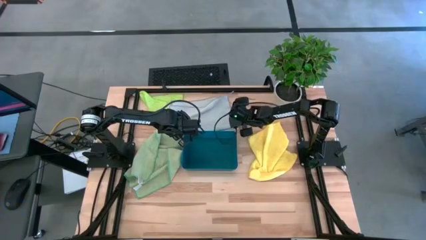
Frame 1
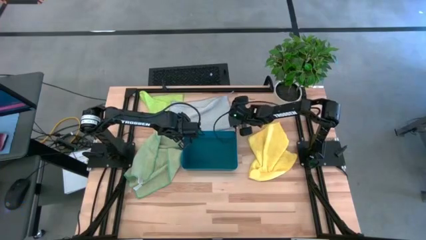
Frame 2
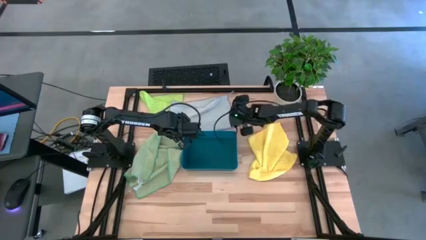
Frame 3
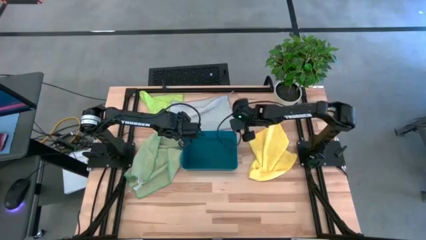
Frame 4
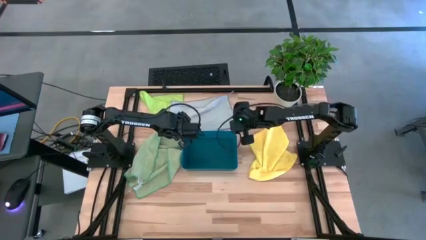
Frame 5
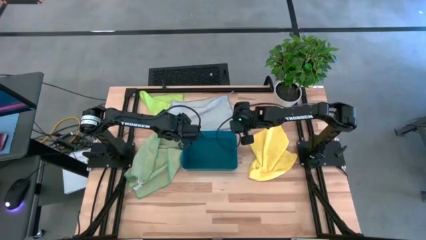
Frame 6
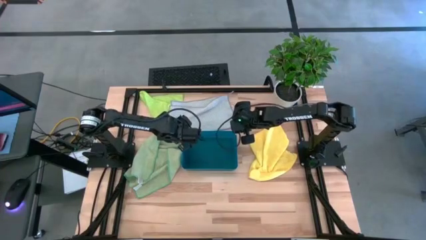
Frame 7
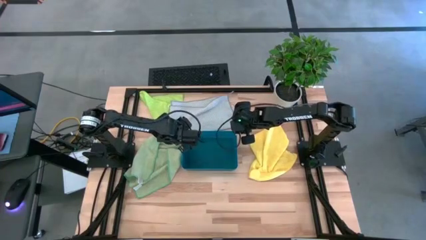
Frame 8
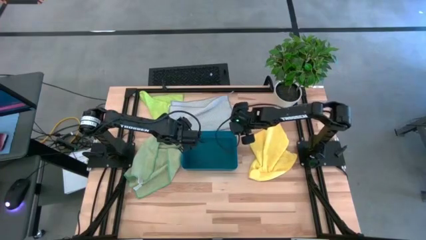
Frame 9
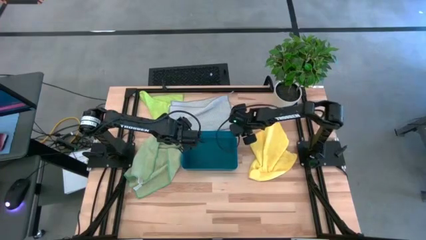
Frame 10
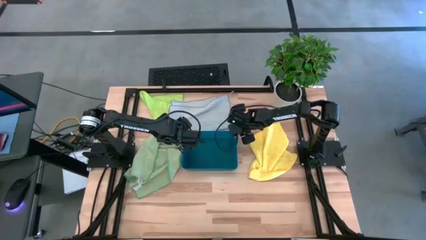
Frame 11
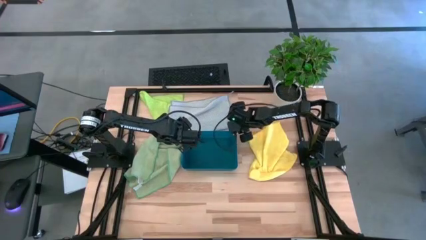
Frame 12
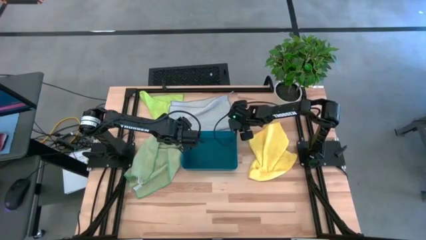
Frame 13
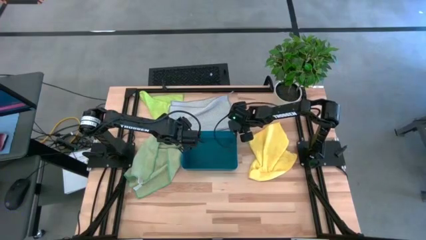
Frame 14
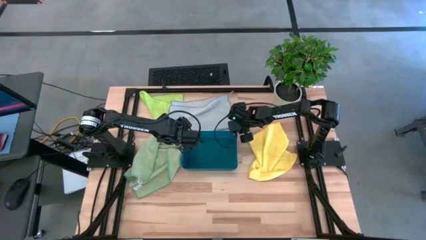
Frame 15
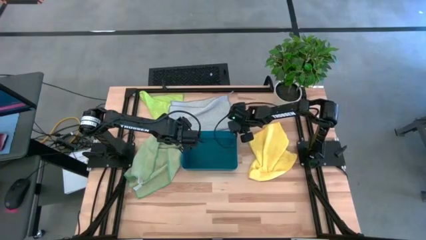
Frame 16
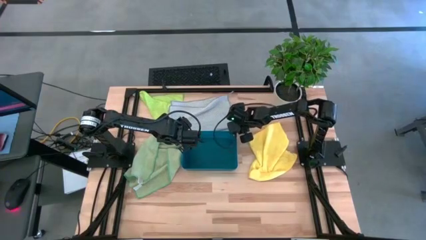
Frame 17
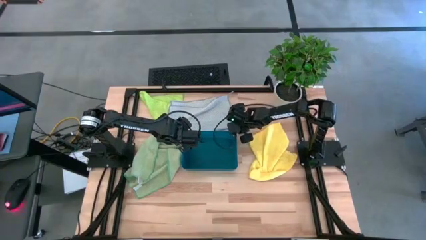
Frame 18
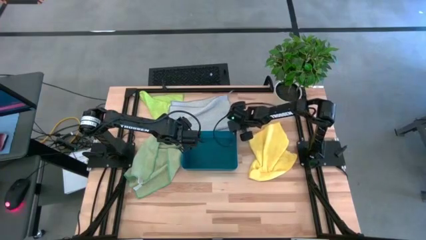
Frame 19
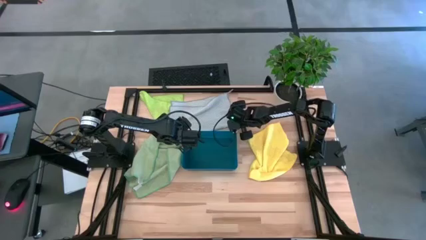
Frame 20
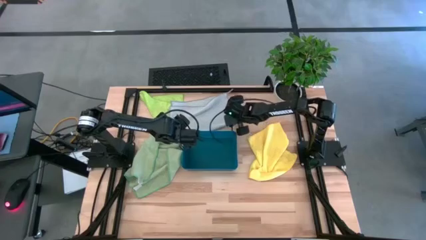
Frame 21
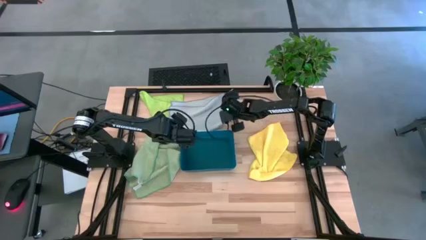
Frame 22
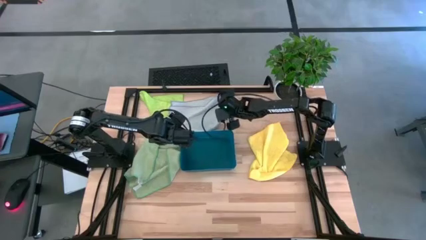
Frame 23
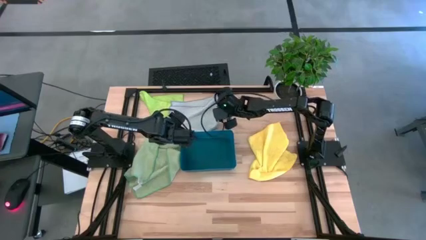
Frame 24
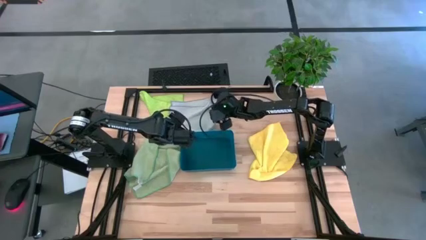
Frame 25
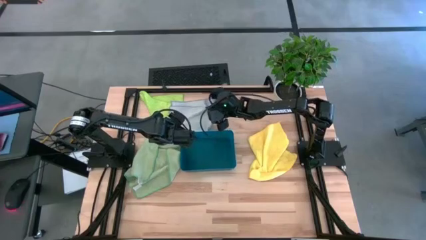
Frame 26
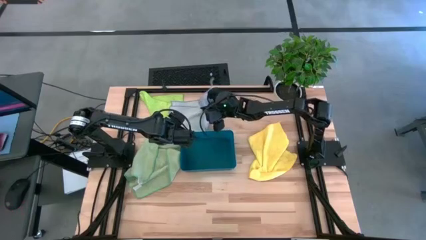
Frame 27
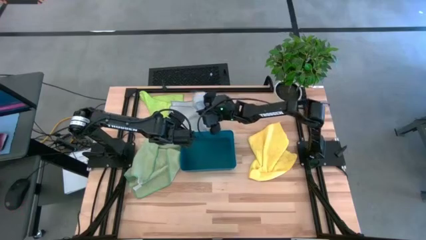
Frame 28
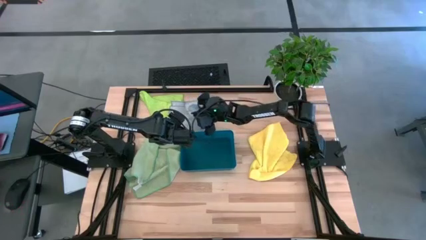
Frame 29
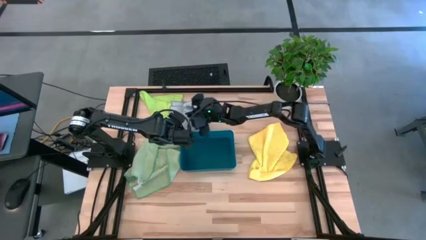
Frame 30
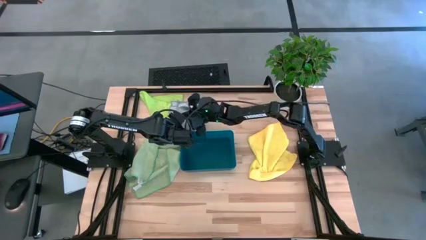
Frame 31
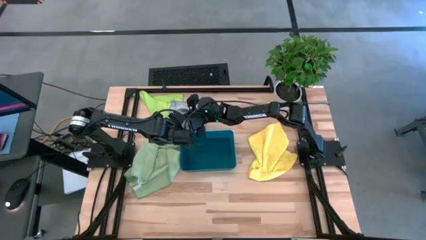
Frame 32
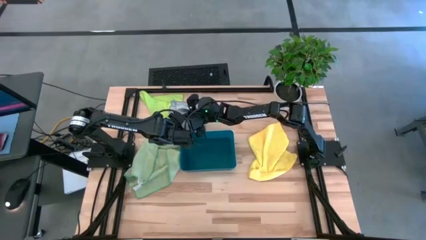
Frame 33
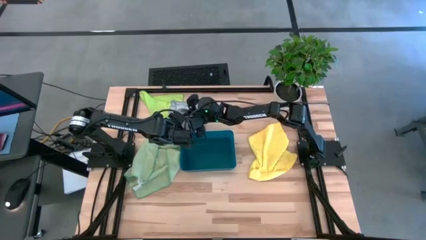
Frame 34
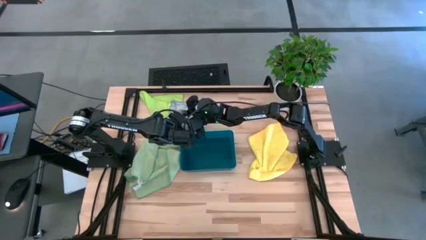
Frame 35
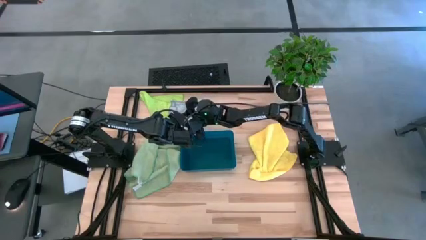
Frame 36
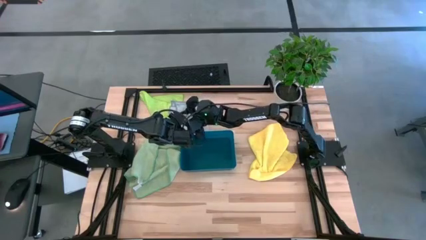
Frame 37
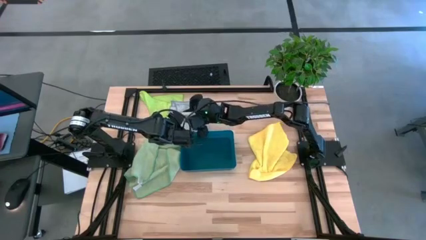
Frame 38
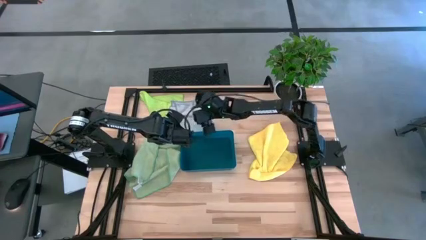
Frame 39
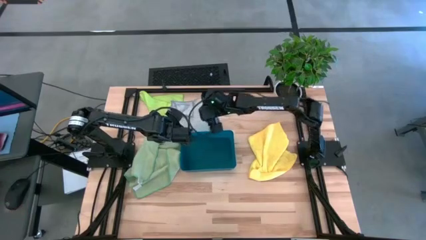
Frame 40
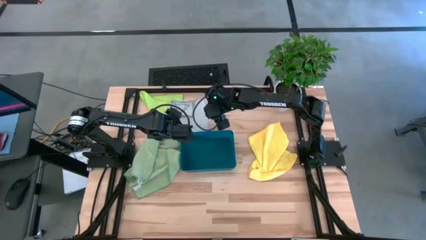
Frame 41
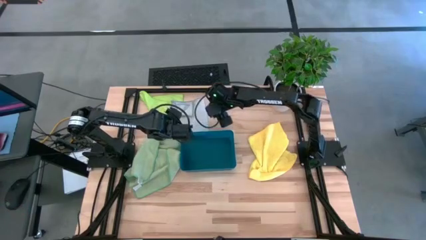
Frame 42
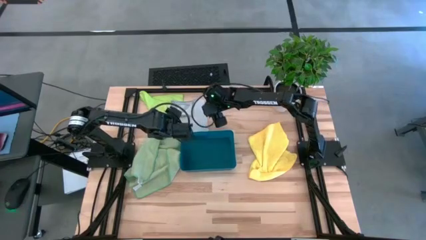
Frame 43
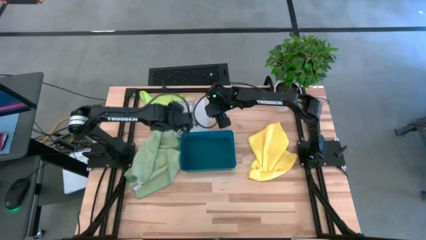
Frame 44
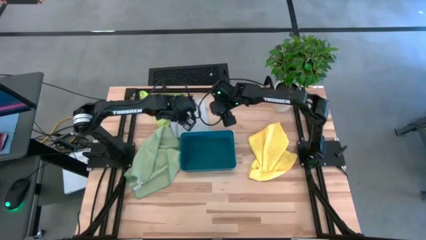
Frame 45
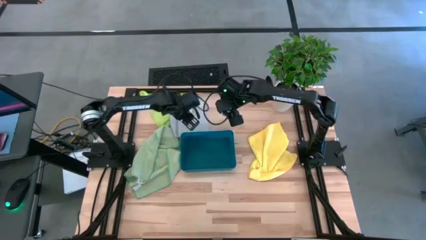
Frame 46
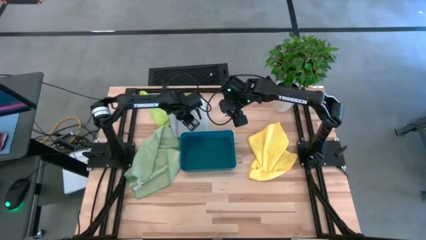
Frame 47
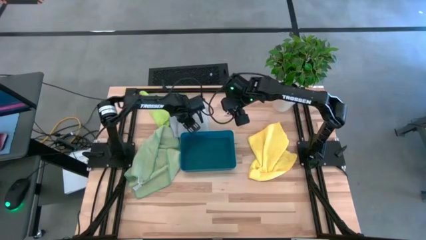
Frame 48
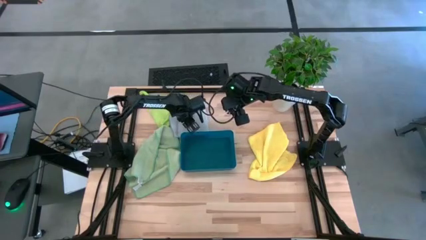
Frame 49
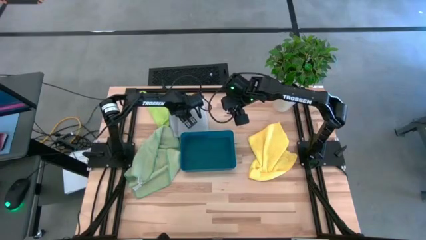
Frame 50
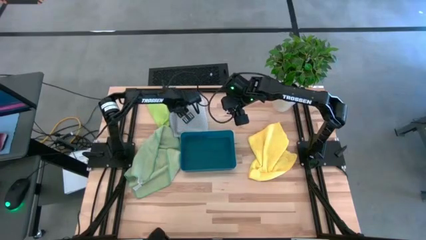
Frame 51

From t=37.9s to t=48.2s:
Task: Fold microfiber towels
Fold the gray microfiber towel

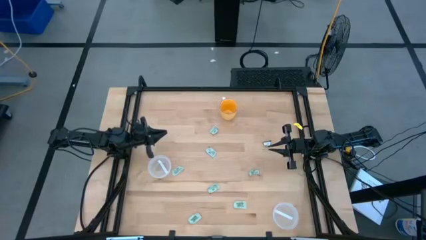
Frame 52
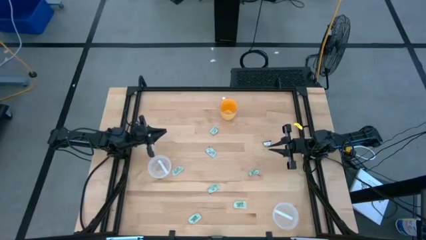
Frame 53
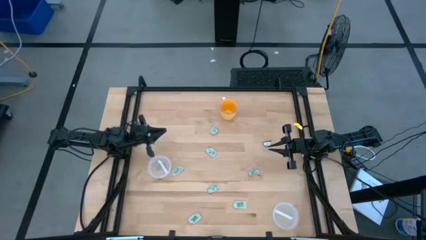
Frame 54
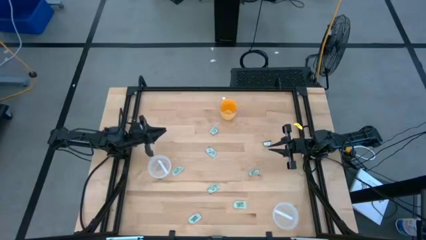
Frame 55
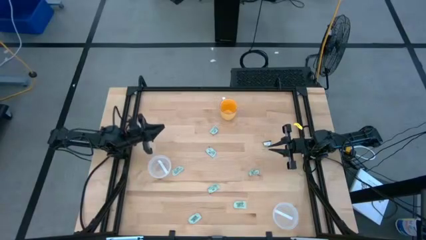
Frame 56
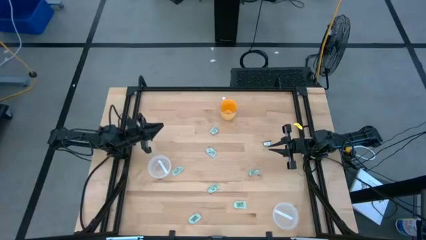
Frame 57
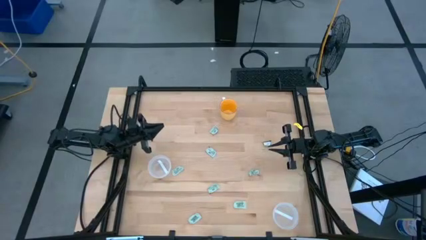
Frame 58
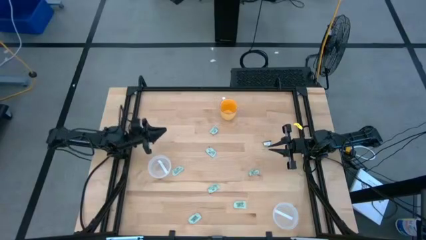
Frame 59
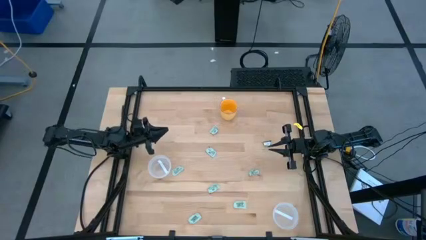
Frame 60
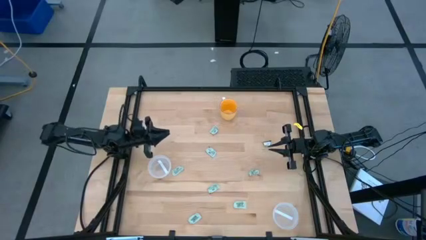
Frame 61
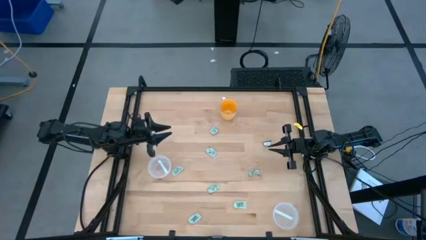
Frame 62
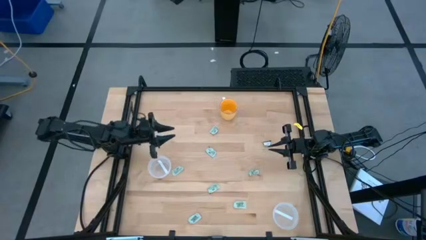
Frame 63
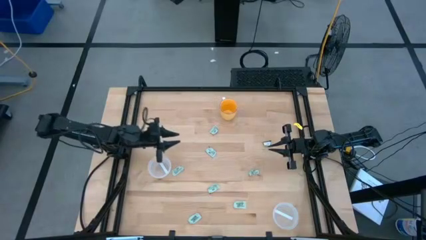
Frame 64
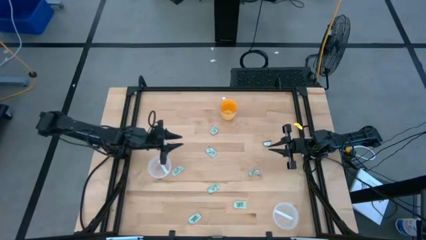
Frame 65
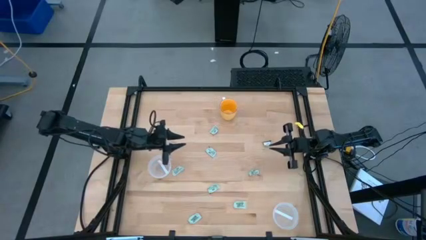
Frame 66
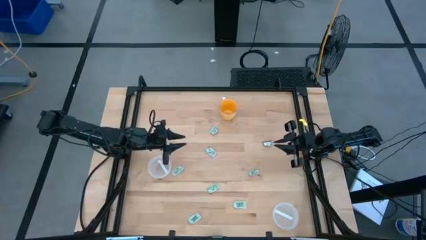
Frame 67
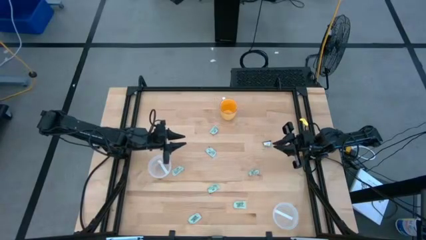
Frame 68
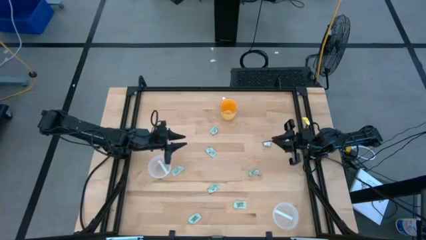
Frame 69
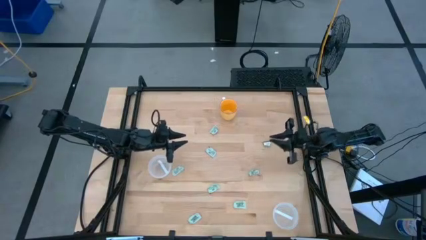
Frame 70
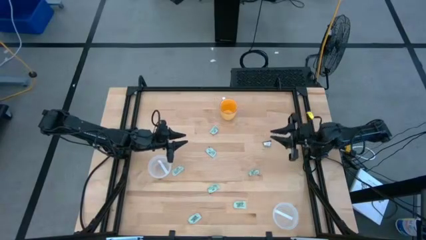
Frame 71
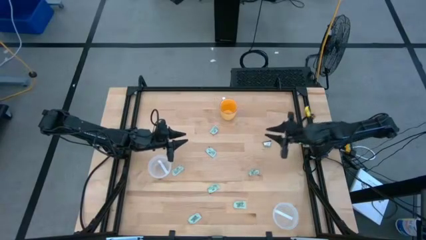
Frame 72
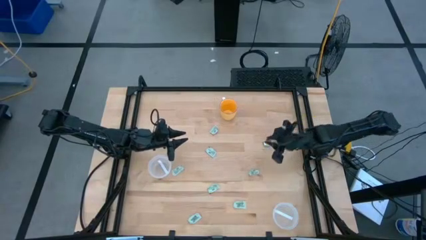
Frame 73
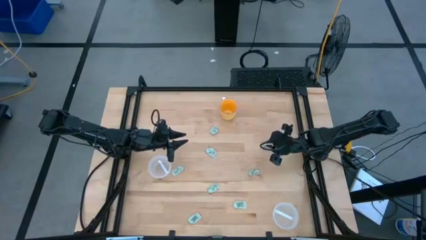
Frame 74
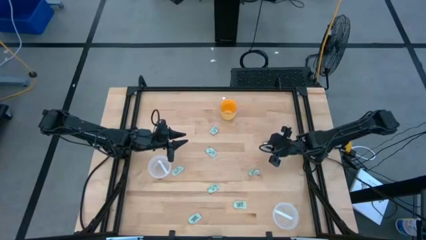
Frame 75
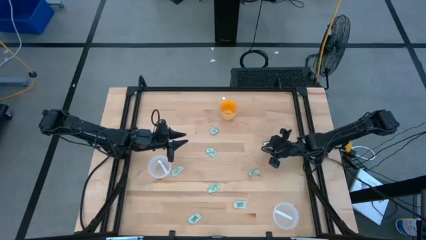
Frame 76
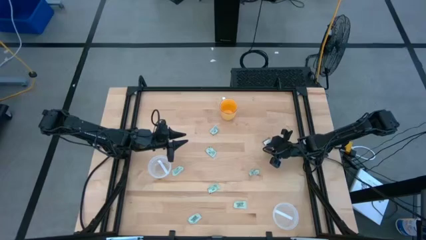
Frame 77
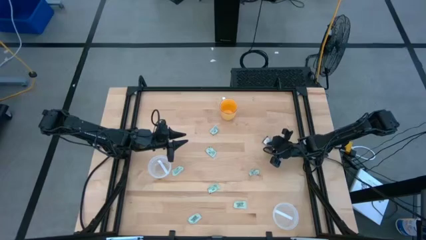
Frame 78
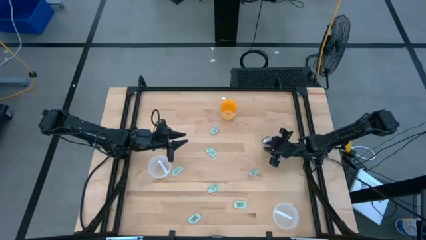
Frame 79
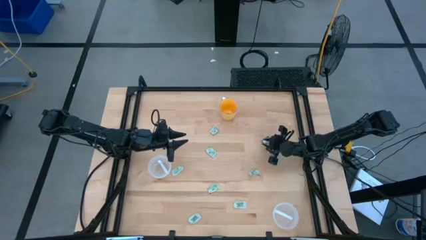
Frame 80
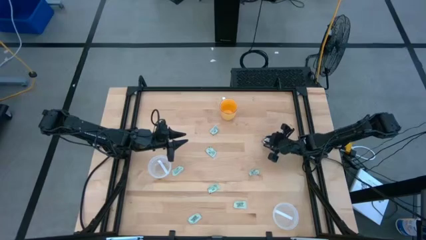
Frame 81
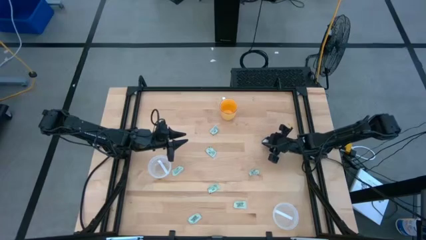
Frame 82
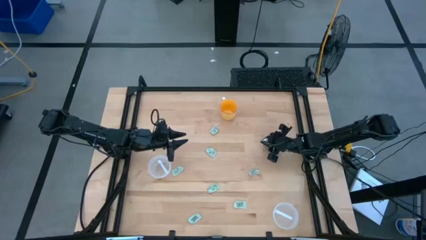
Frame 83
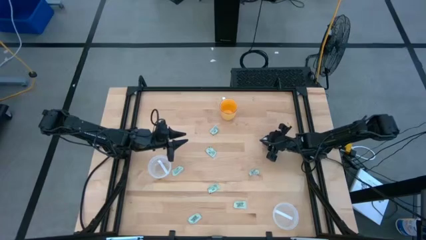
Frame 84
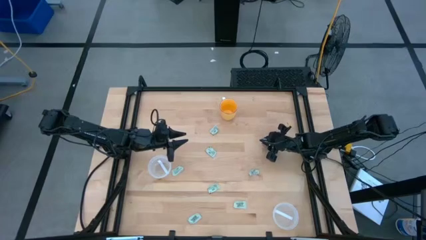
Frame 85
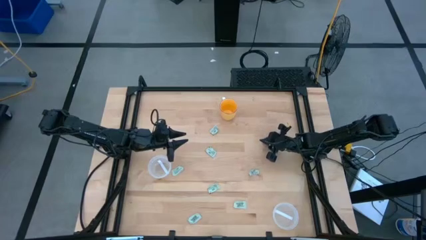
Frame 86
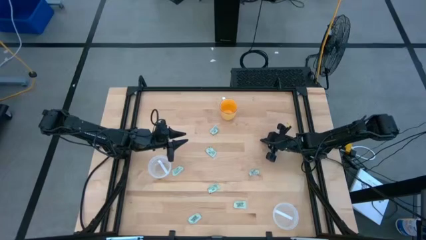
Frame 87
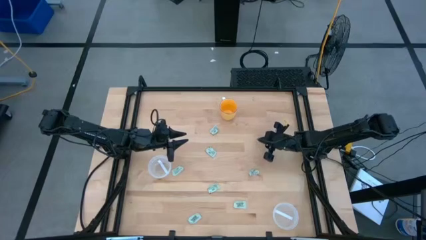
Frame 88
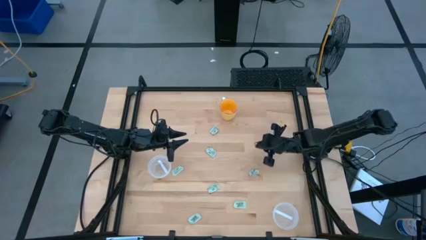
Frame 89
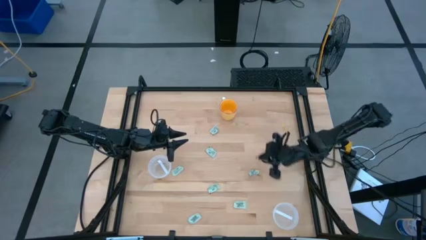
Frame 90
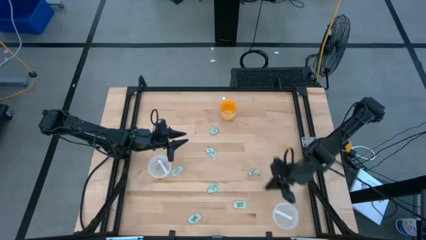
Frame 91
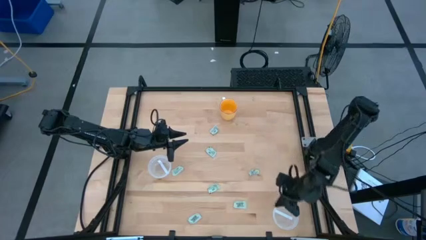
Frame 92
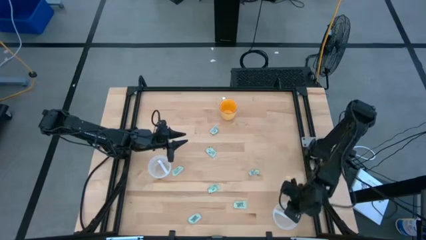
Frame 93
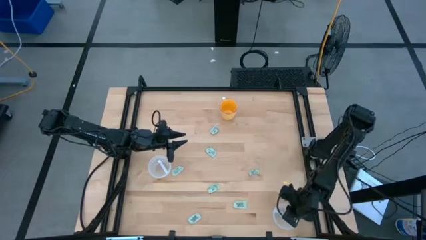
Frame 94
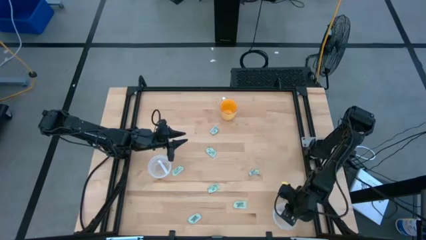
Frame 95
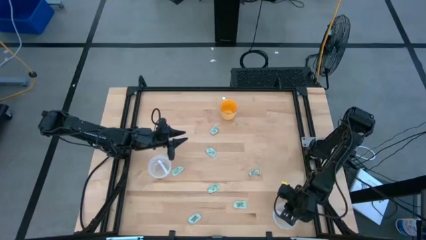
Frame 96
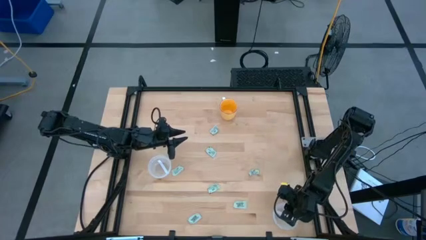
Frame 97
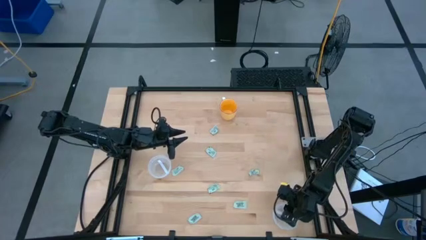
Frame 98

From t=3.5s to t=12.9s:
Task: Pick and place Stevia / Truvia into bins
Put the green stevia packet into the right transparent container
